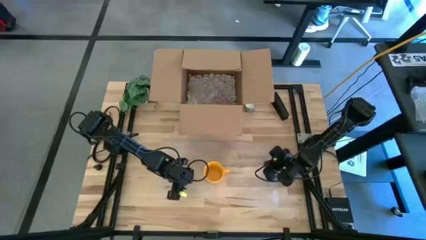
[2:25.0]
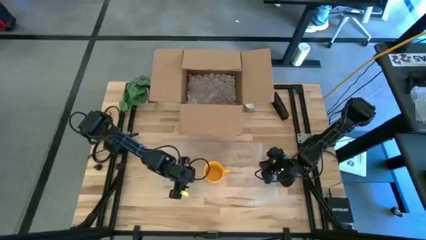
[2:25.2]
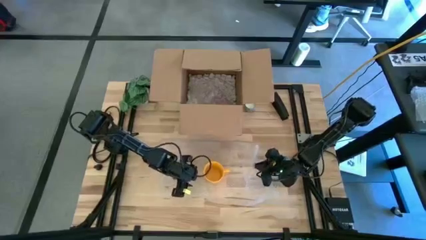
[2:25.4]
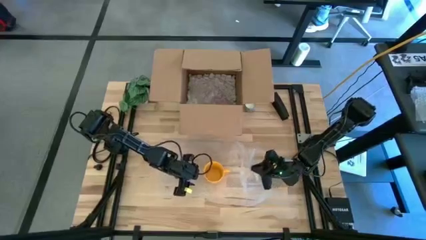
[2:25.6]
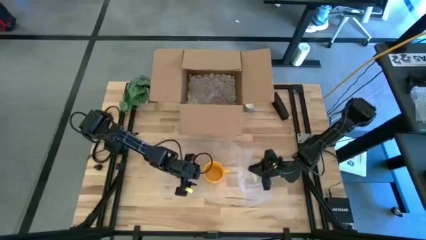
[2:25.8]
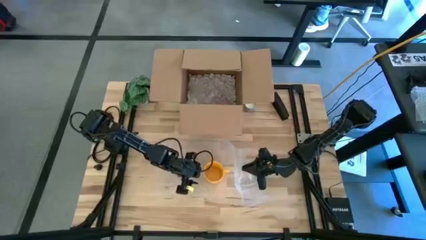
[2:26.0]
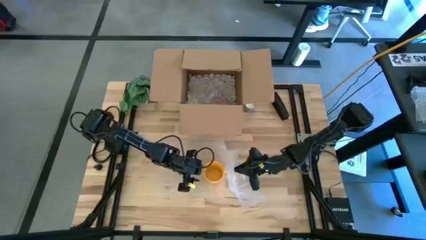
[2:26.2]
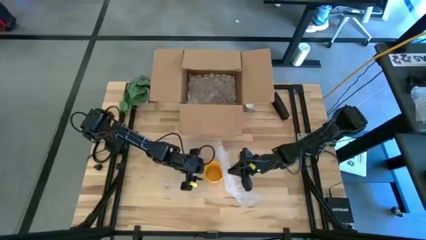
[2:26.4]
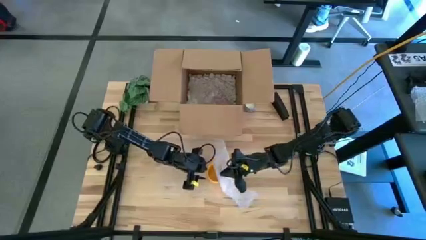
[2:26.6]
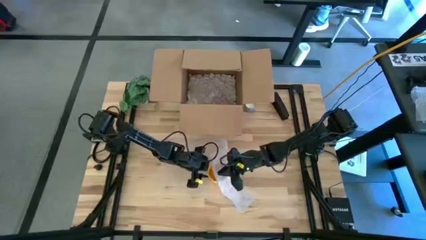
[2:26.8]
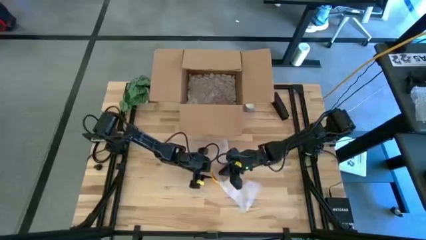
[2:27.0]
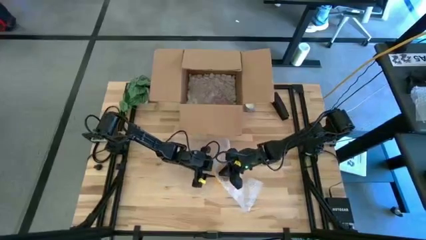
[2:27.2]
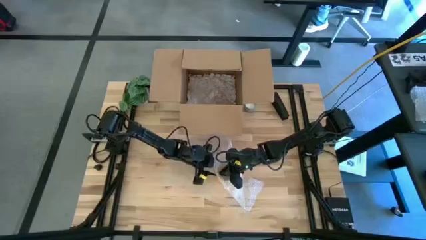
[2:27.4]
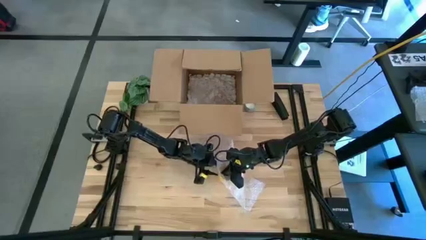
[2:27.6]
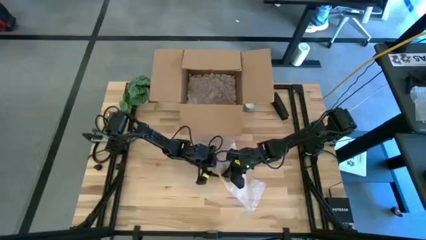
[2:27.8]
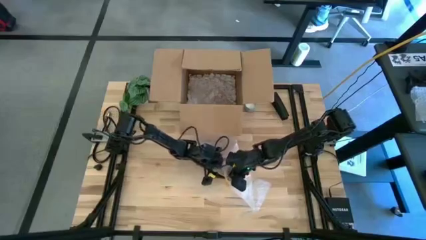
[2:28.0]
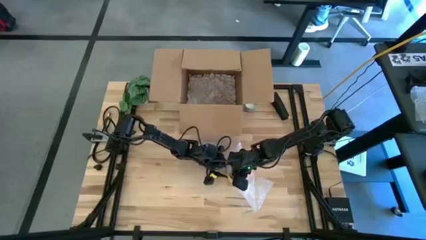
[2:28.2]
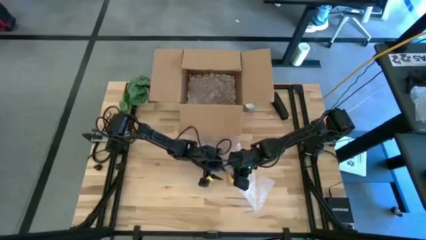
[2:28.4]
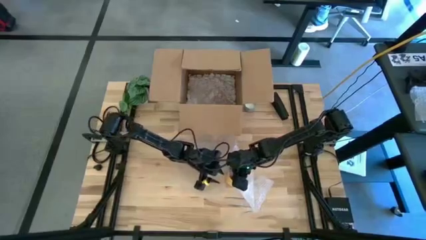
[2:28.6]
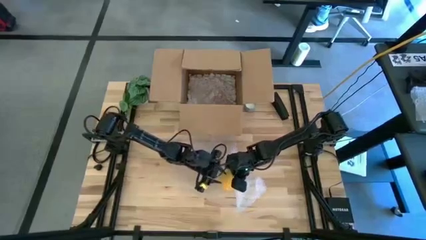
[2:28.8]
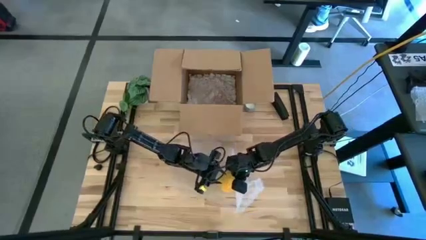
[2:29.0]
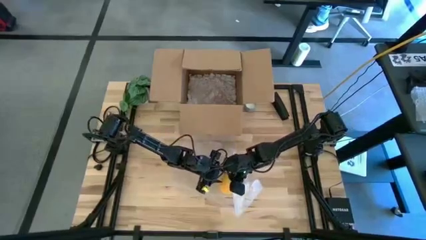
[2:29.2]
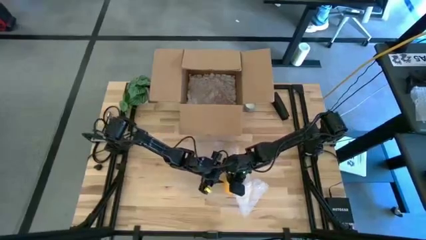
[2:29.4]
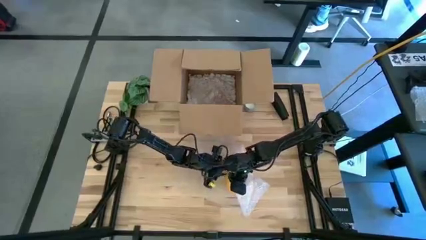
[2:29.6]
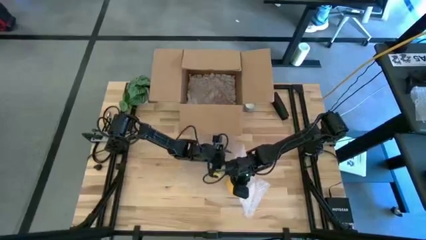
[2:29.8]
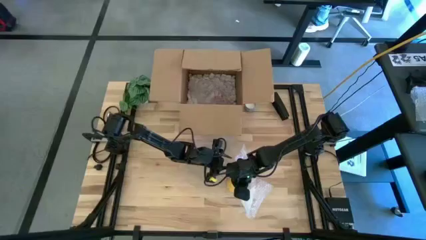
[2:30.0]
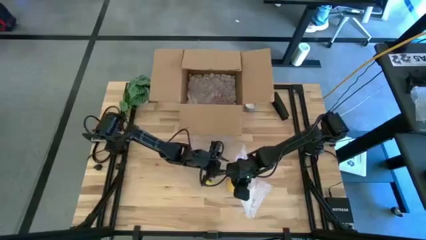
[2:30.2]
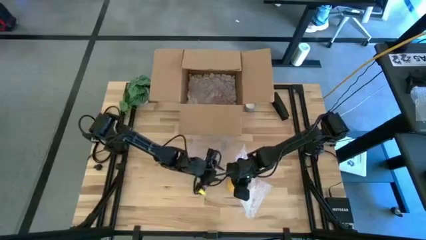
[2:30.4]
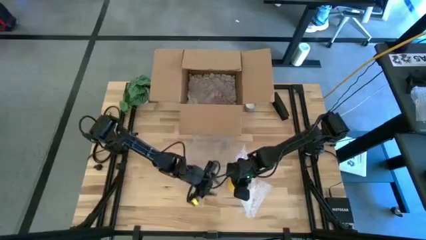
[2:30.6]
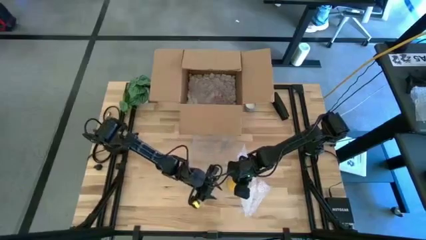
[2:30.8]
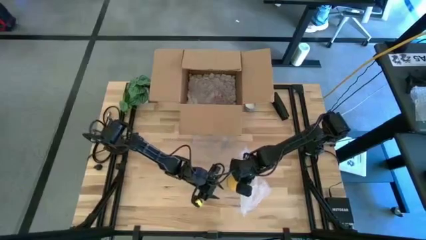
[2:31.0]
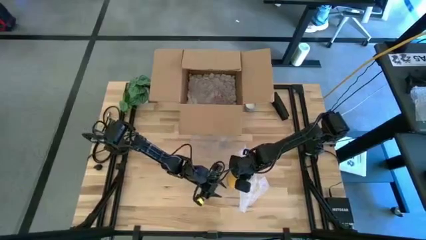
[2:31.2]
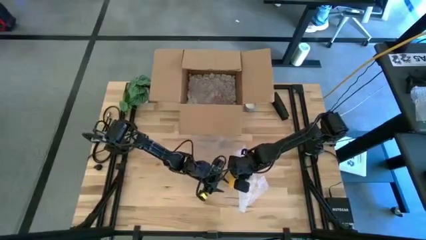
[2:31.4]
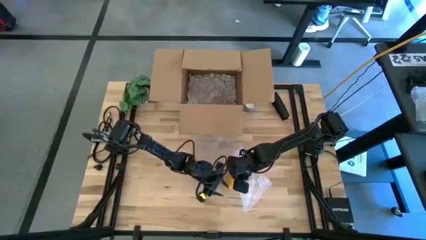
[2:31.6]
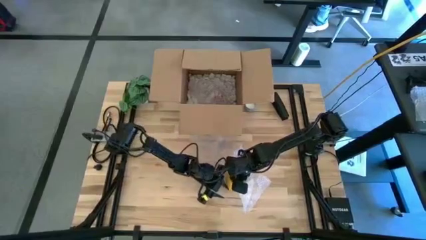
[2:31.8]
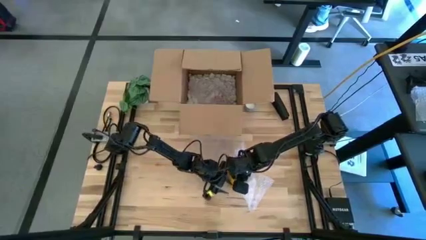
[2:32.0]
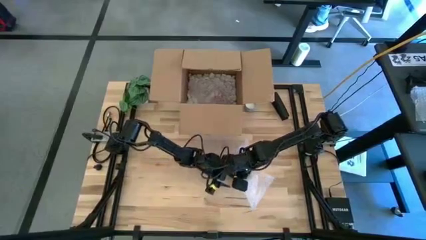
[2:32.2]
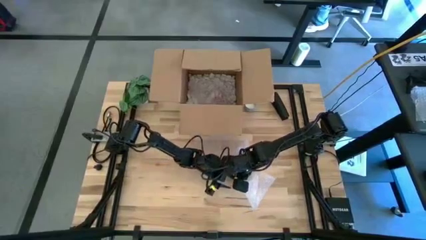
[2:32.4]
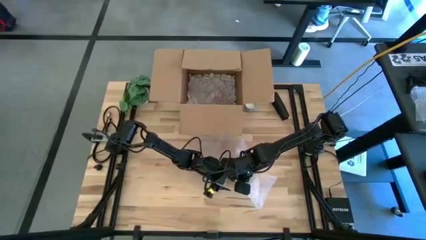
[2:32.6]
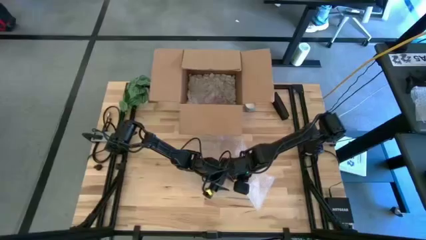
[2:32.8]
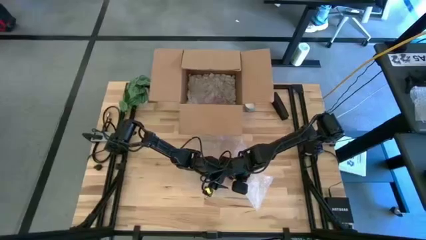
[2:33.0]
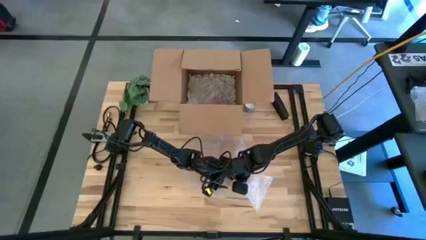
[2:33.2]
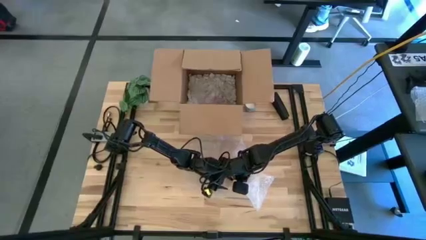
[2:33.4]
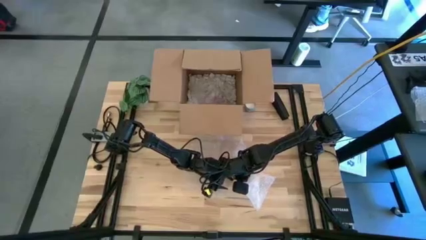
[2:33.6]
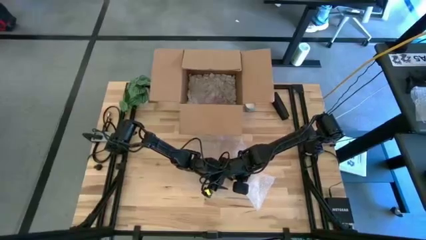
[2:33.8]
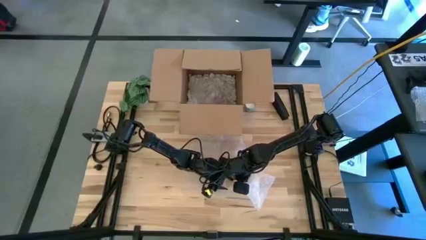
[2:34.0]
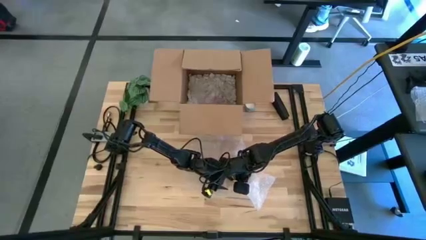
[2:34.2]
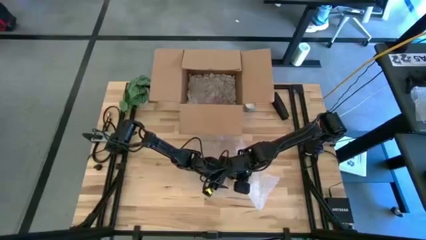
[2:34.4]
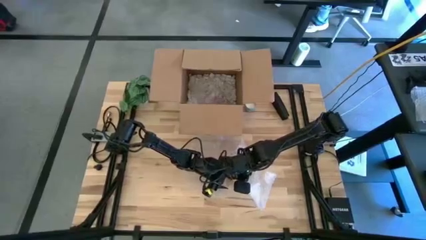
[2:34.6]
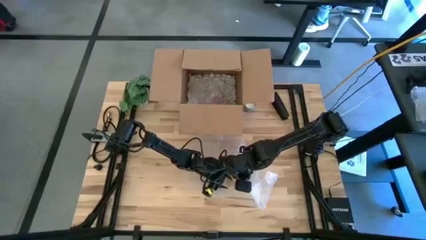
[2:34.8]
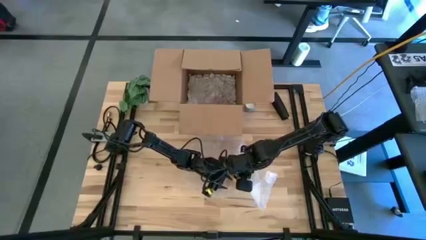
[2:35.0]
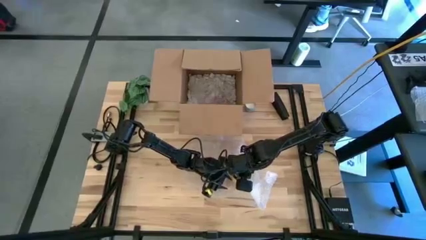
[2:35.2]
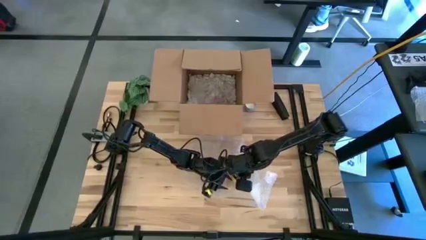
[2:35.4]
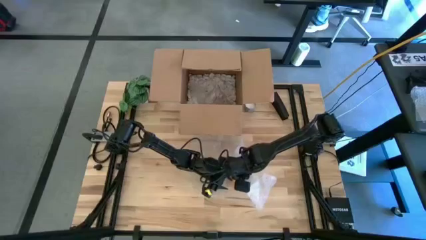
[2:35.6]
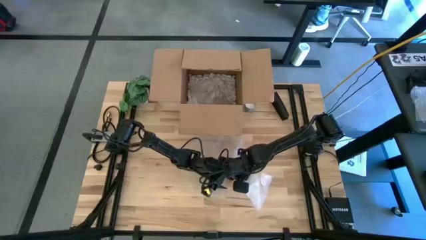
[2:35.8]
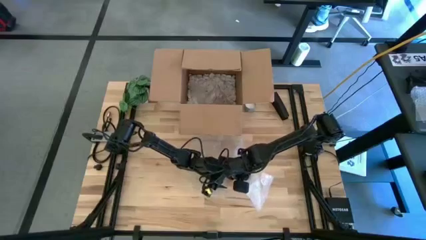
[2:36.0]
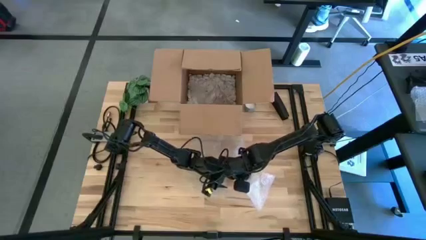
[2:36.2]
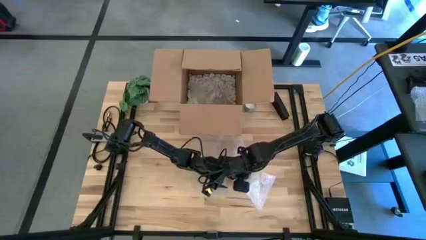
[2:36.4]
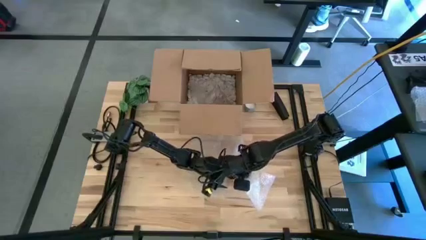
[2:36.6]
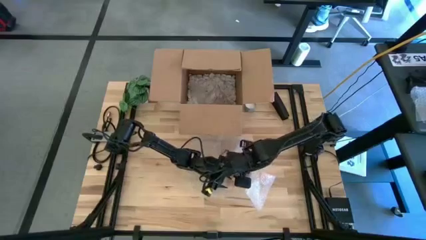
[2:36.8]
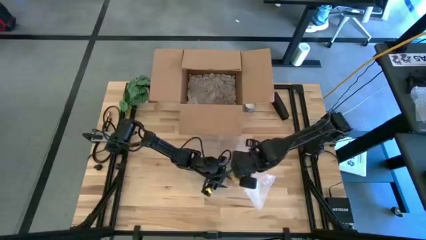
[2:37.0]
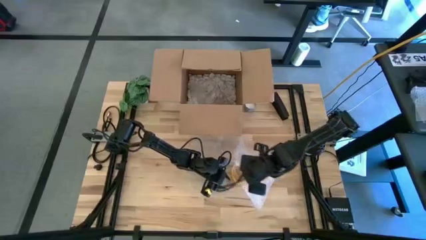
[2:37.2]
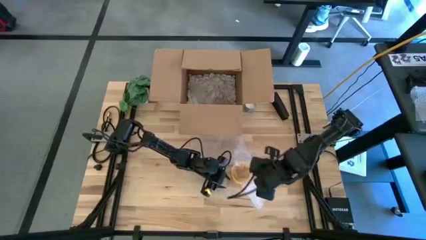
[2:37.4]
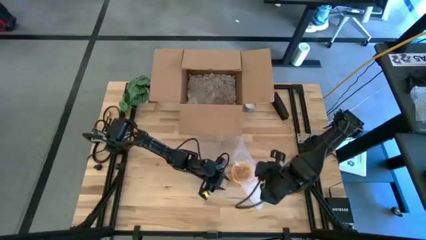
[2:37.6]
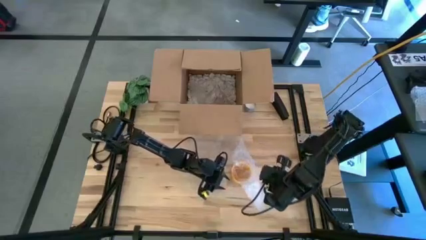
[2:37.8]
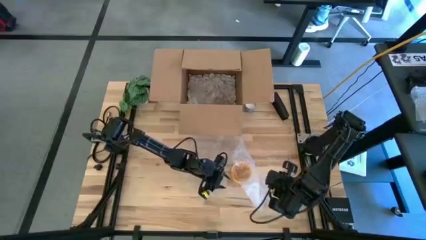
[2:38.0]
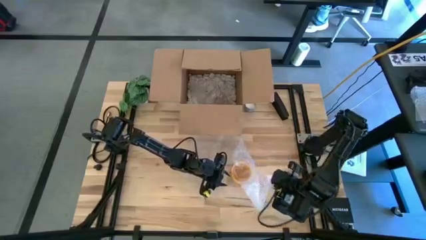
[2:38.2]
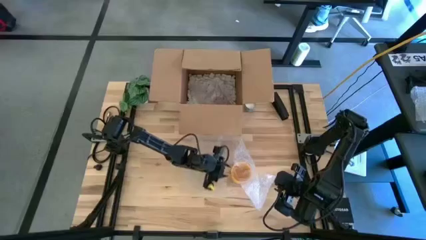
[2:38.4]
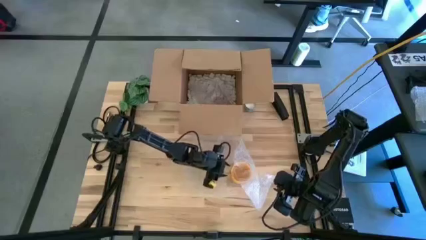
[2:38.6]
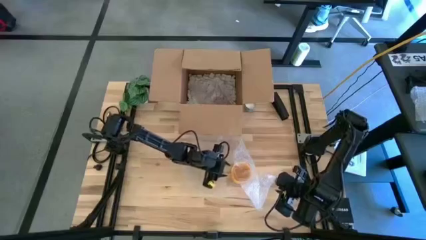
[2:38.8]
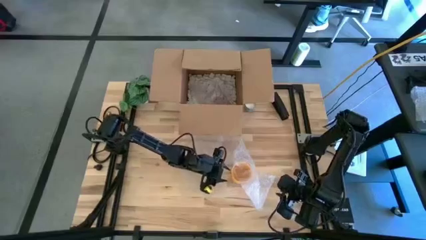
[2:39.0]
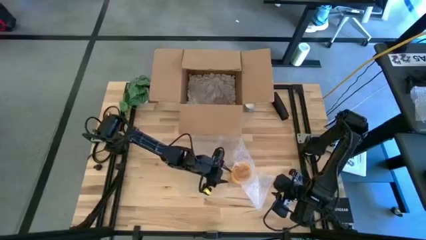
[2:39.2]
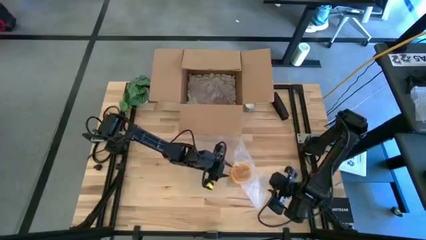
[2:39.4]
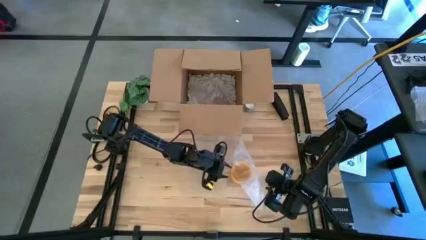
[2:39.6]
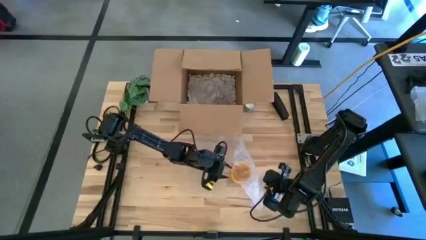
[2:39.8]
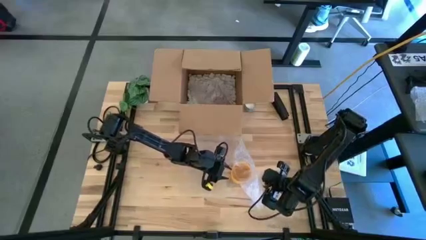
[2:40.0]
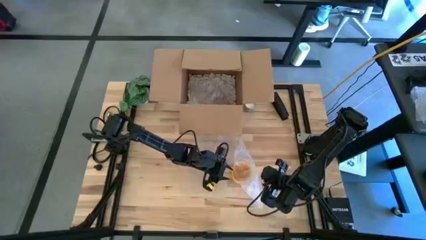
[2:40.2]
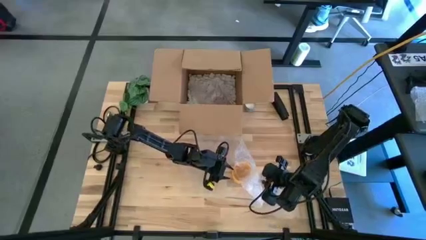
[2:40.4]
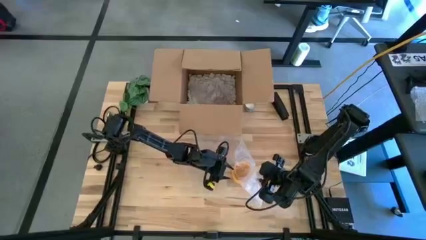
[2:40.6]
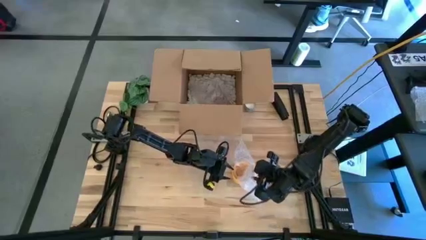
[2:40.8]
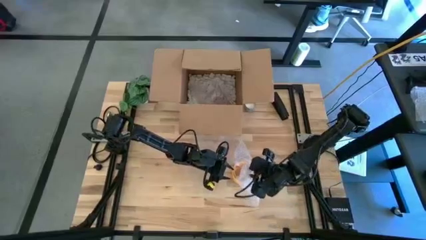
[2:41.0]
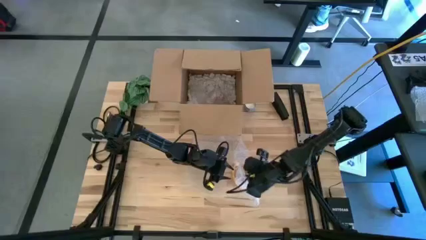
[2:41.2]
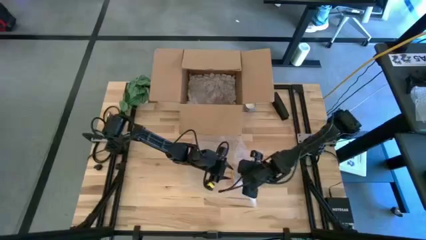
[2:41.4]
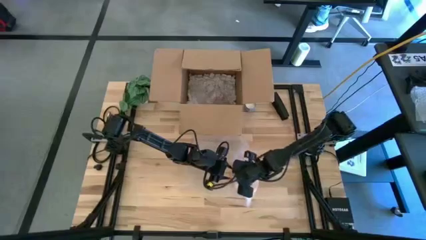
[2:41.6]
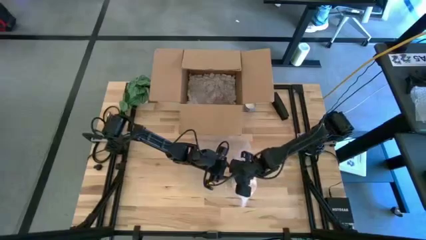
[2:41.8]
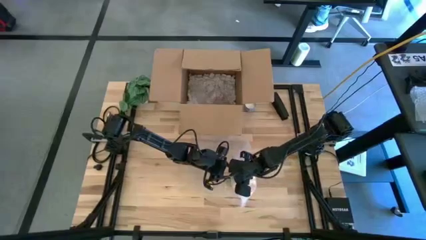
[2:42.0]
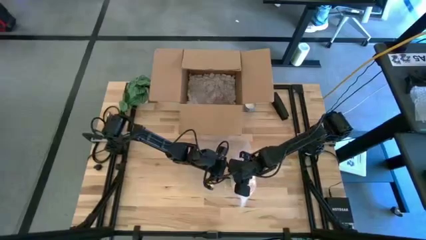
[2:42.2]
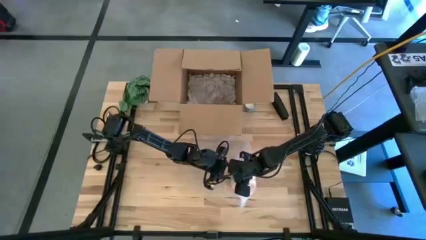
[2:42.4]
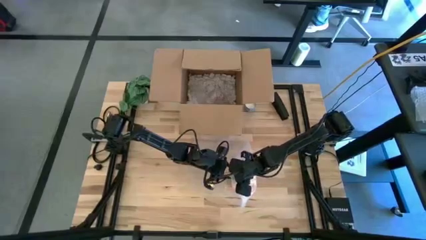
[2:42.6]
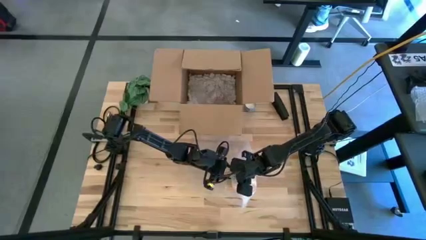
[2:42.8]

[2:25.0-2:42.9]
Task: wrap mug
Wrap the yellow mug with the bubble wrap
